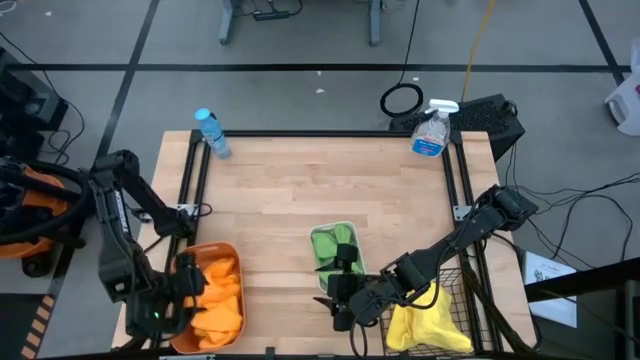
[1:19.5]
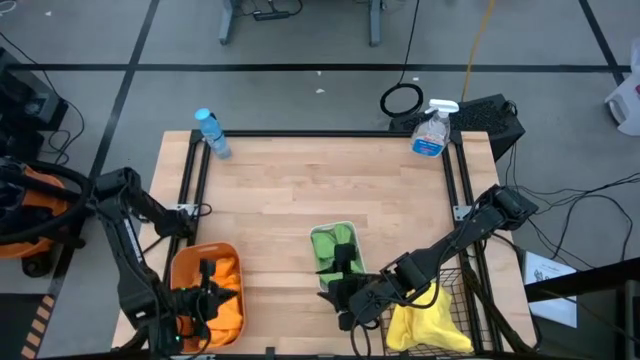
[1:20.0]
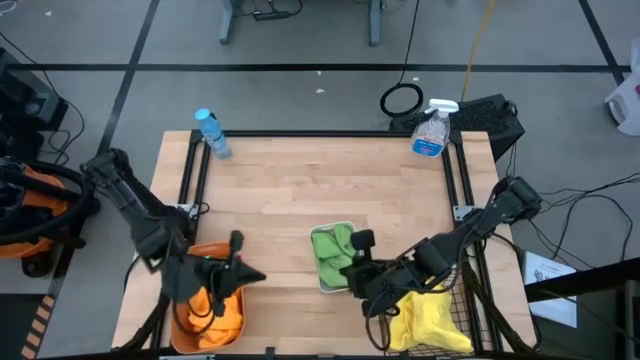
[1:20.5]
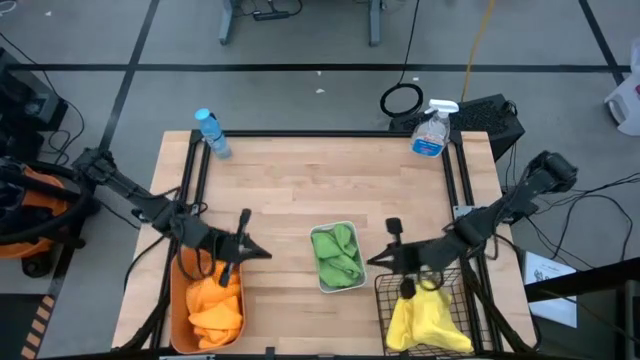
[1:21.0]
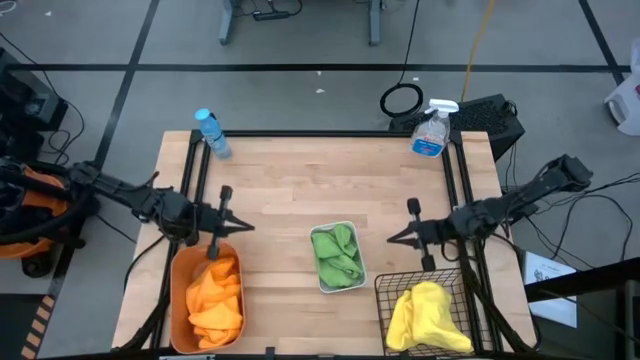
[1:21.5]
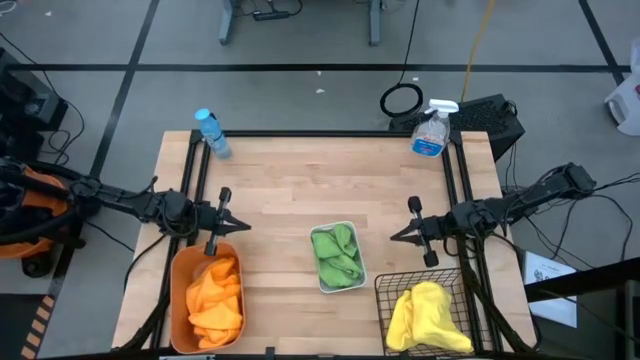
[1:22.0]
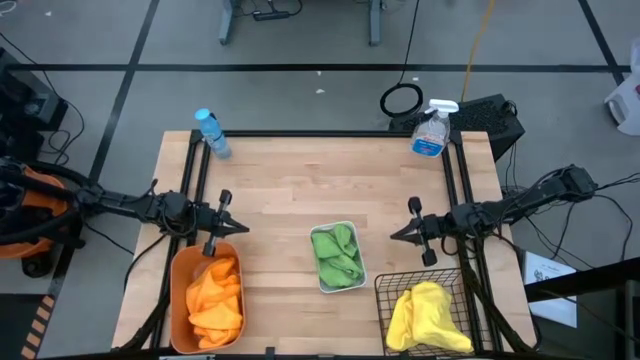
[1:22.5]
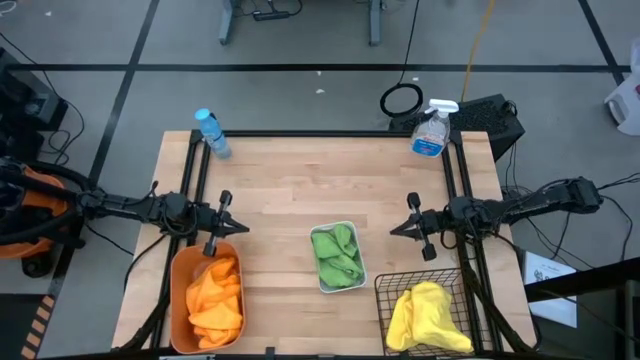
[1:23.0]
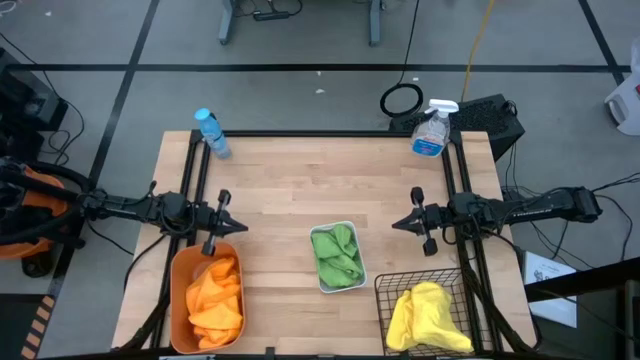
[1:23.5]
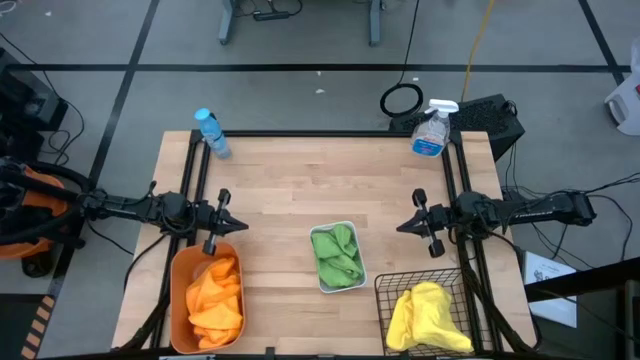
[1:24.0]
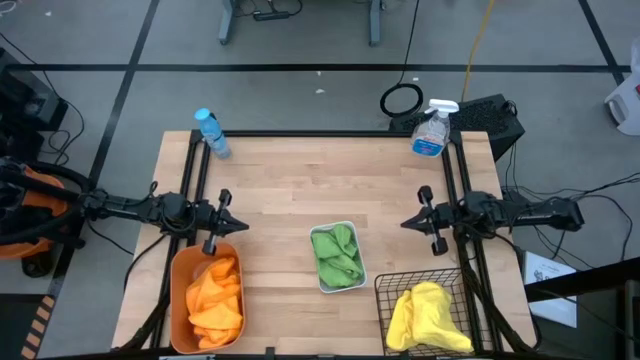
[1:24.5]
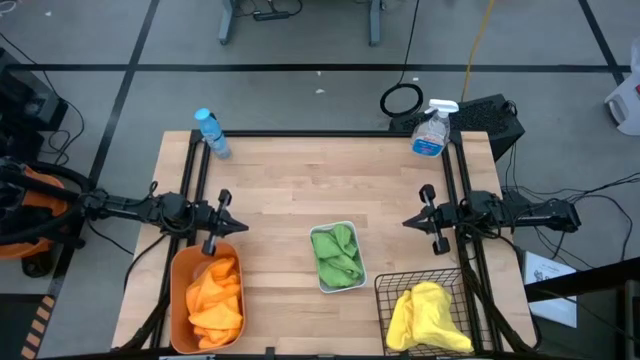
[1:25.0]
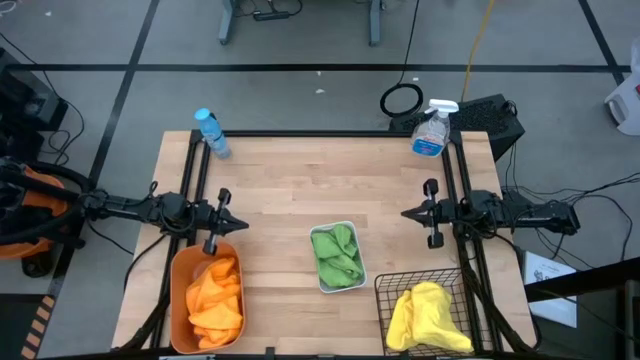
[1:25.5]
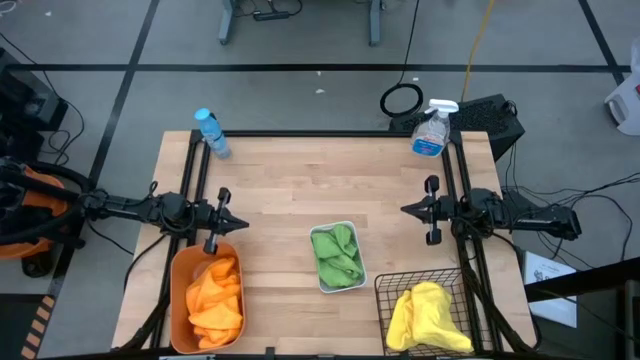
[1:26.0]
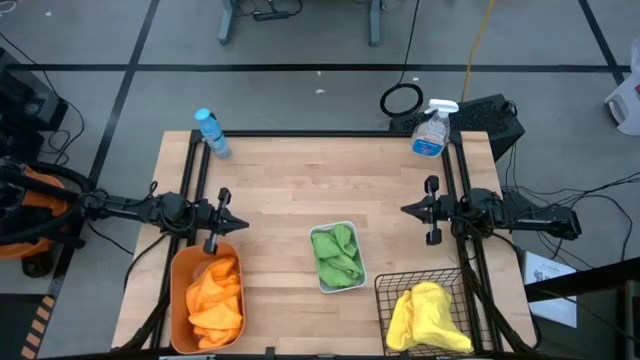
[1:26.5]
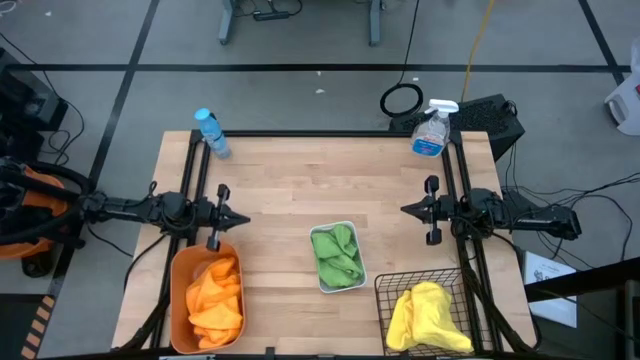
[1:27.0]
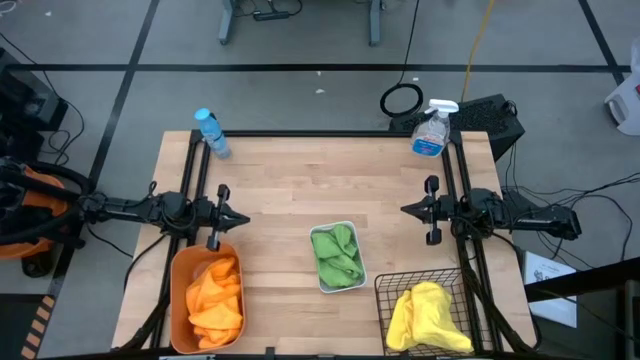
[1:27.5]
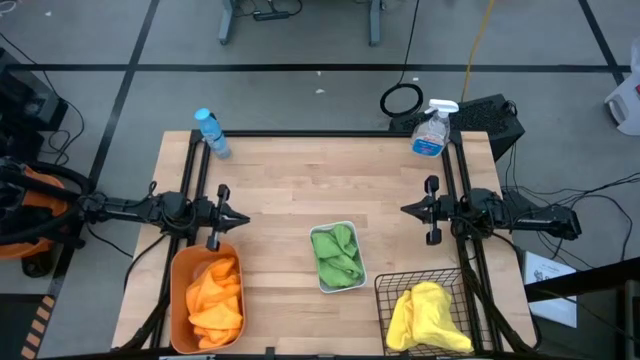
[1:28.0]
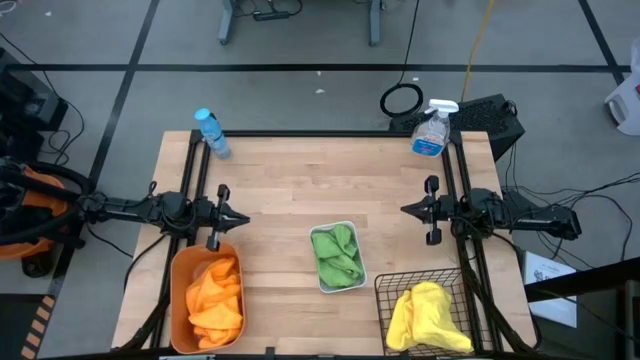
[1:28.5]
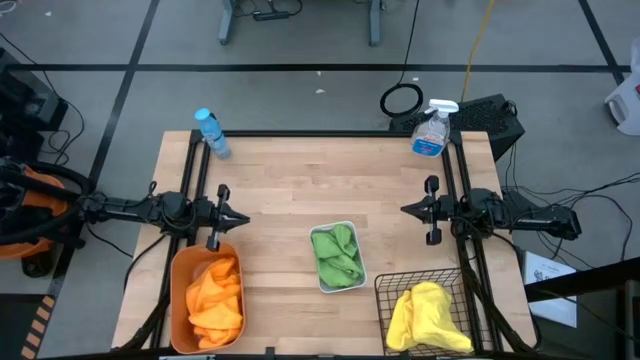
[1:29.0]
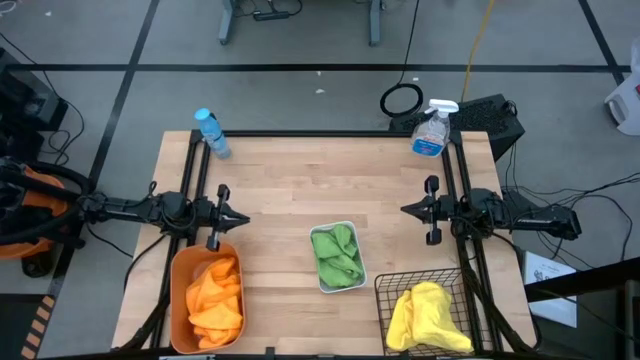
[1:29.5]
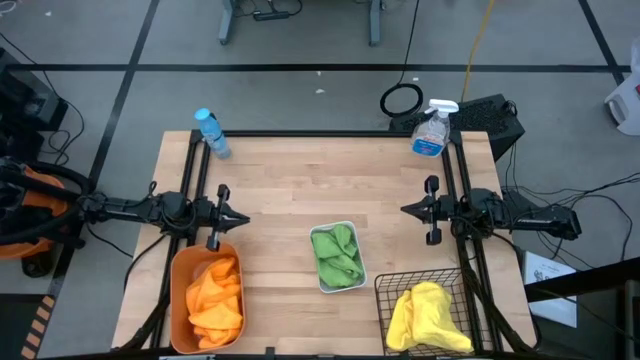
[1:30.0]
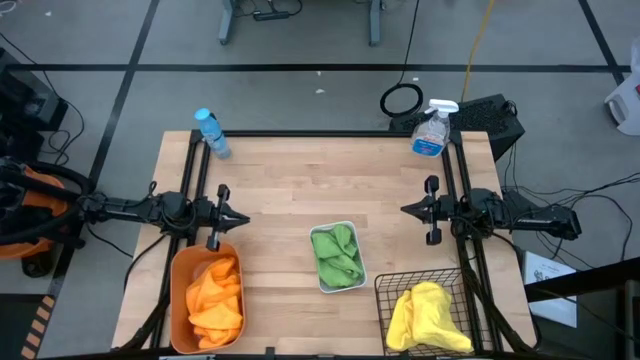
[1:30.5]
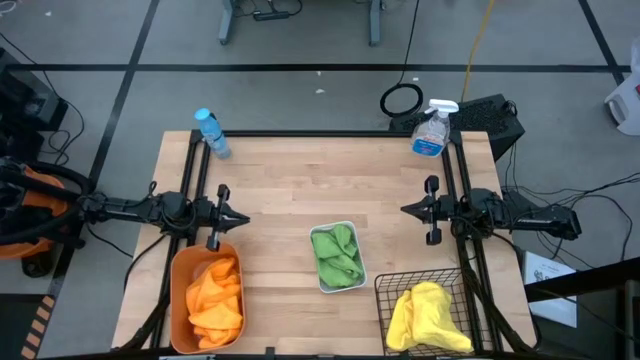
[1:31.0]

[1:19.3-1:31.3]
Task: Sort microfiber towel by color & place in baskets
Return to Home Position

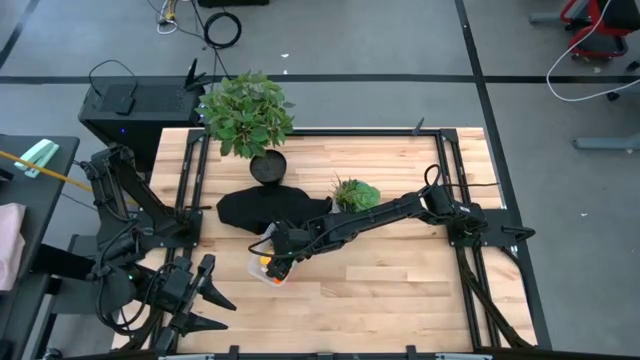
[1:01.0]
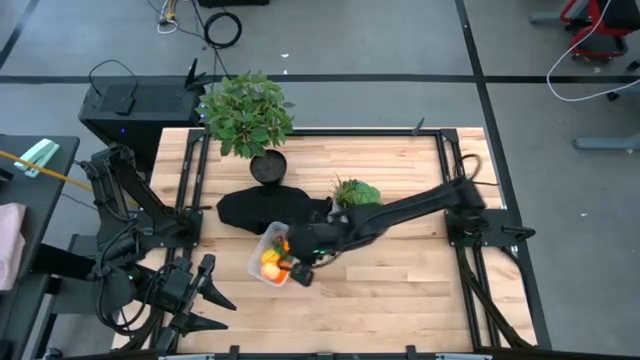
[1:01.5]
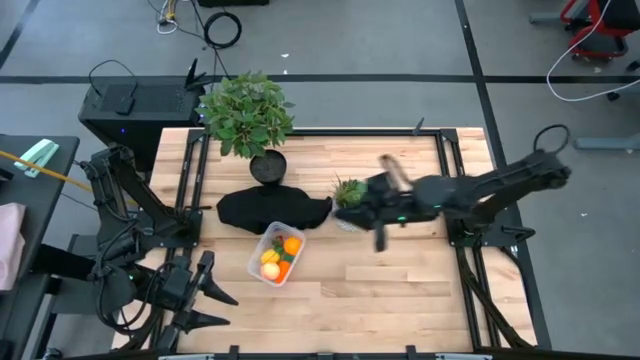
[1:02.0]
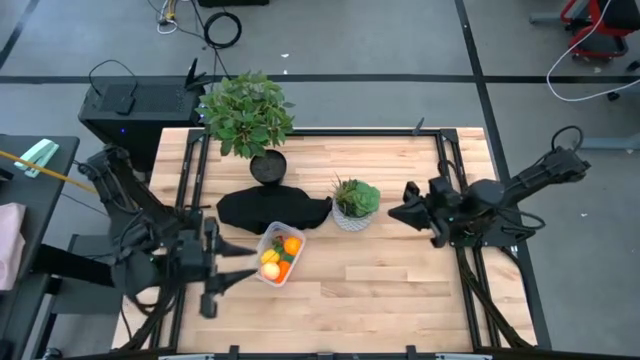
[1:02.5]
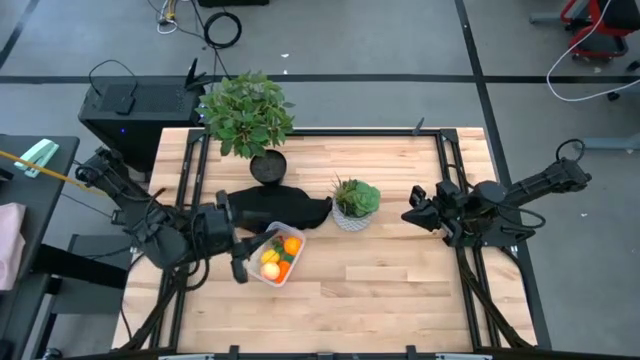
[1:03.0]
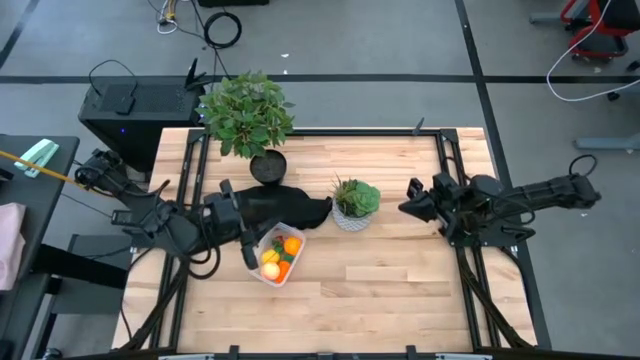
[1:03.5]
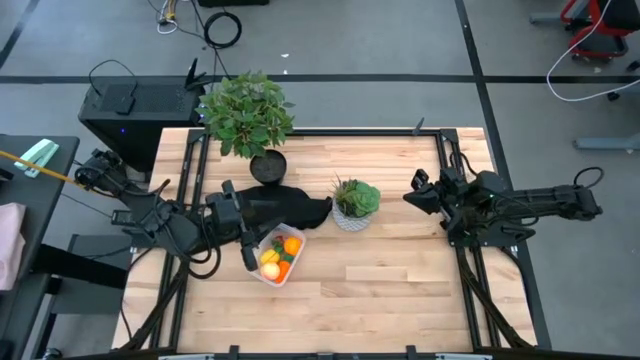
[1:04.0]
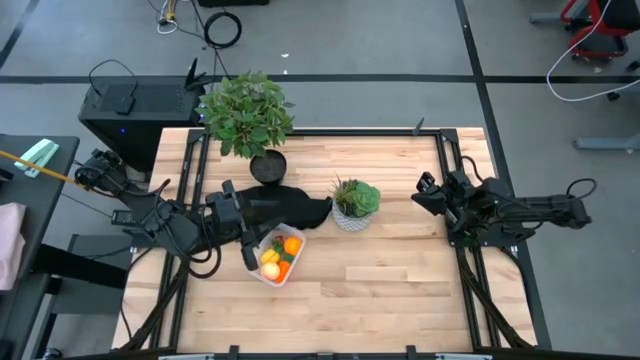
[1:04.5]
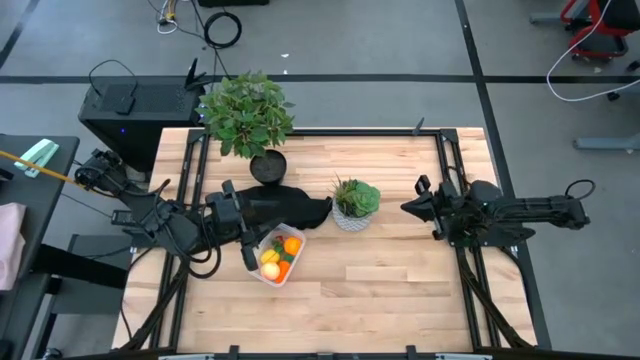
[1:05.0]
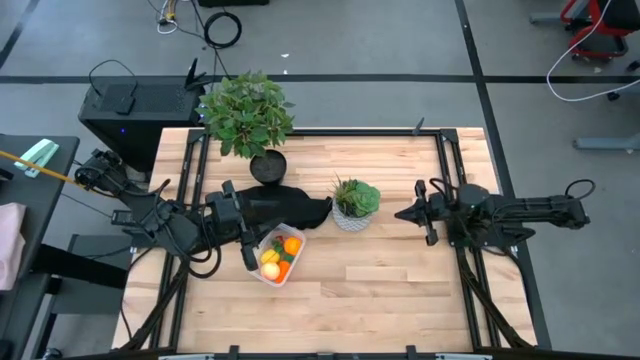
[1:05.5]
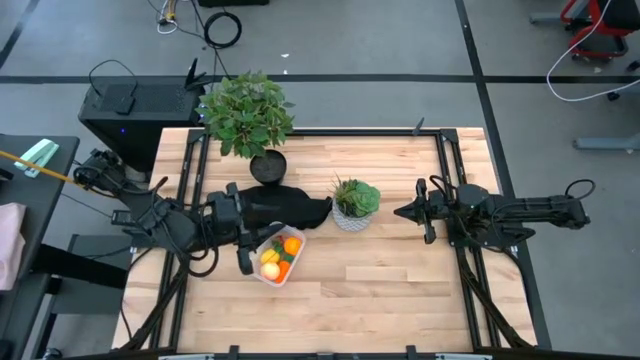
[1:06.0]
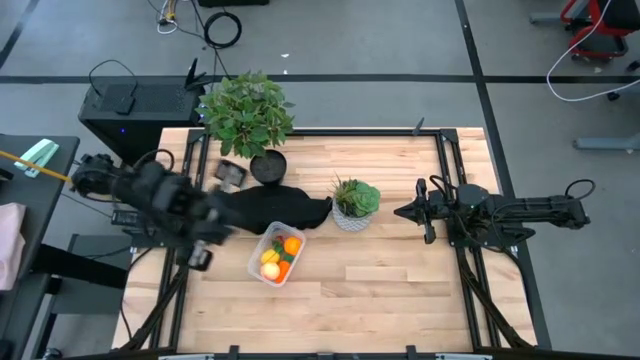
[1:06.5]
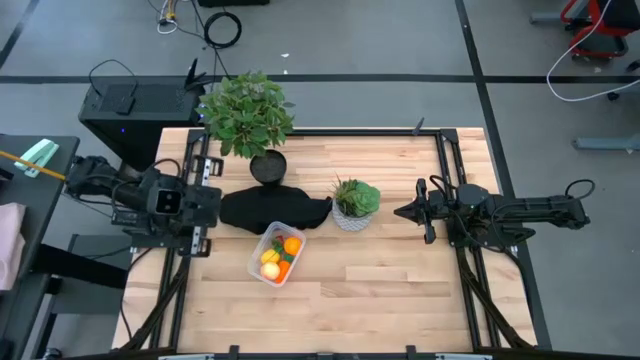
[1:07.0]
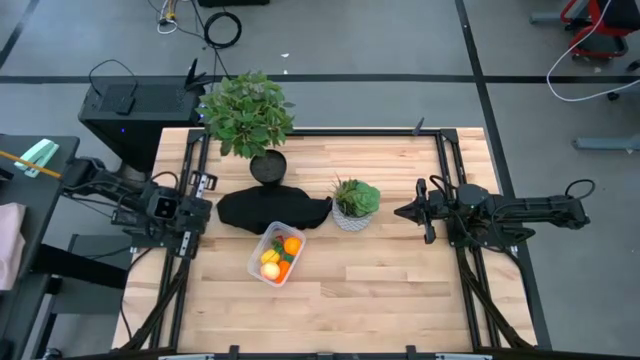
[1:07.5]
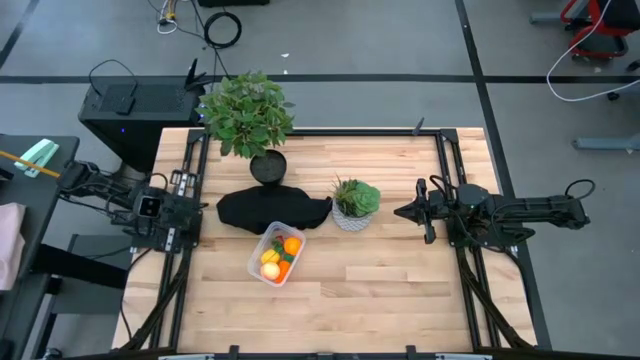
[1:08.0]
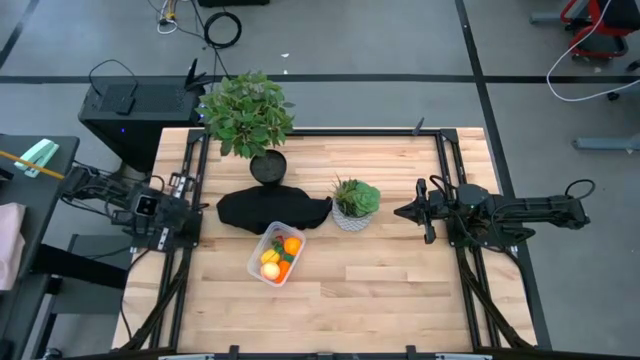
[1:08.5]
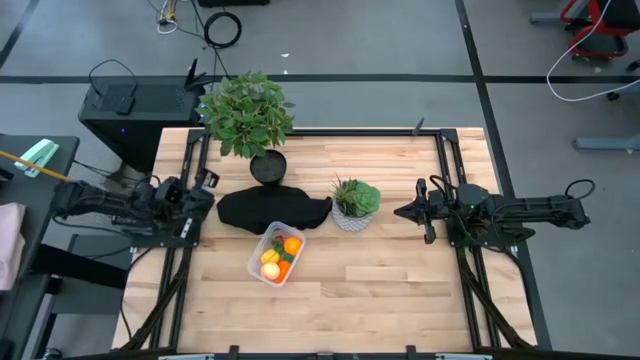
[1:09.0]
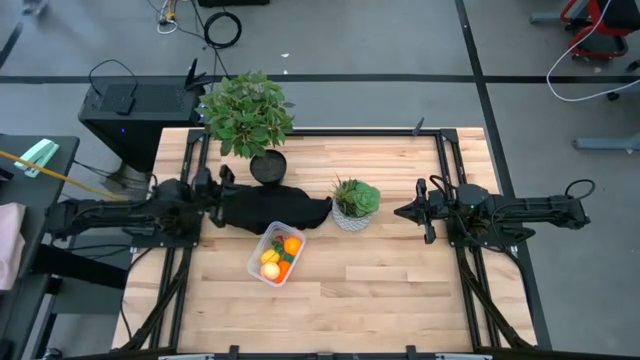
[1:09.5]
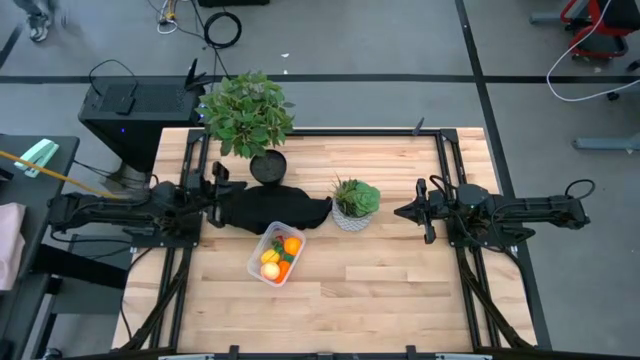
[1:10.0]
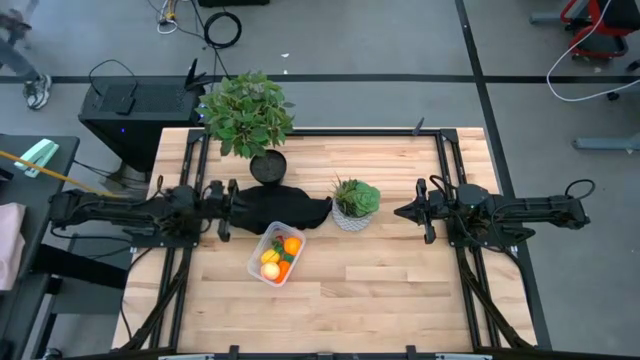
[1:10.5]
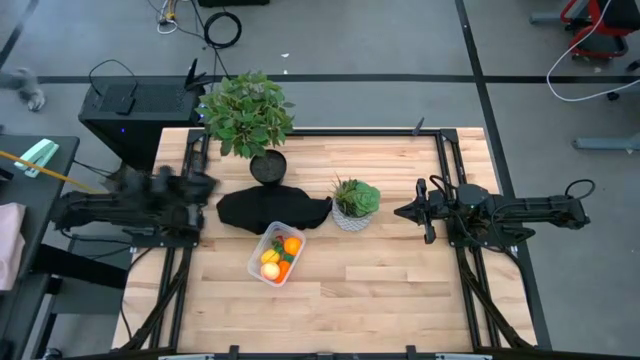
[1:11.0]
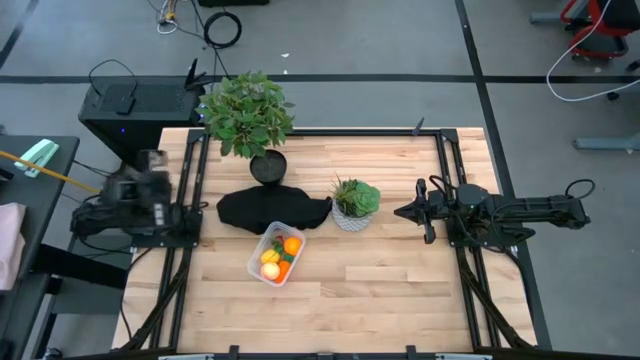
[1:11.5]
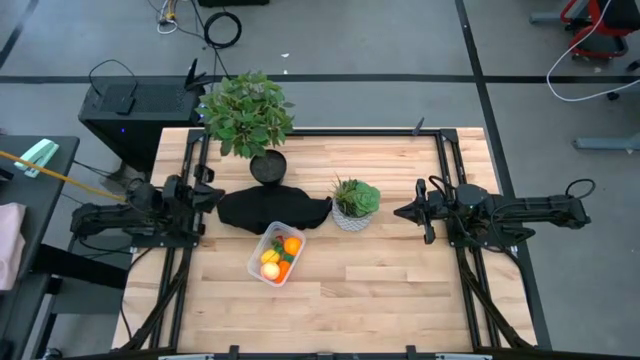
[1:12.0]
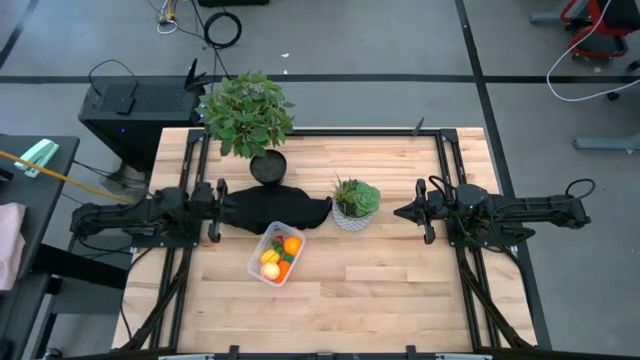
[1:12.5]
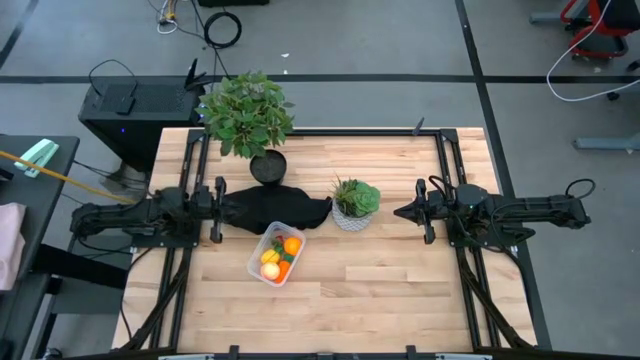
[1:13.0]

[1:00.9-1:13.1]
Task: Pick and placing Produce into tupperware
Return to Home Position
